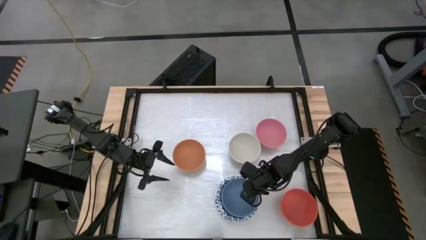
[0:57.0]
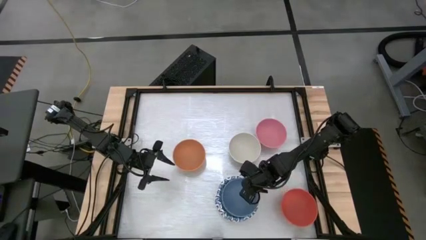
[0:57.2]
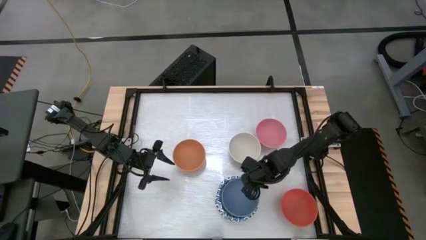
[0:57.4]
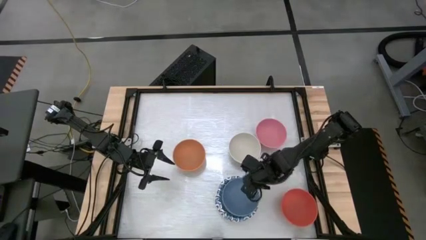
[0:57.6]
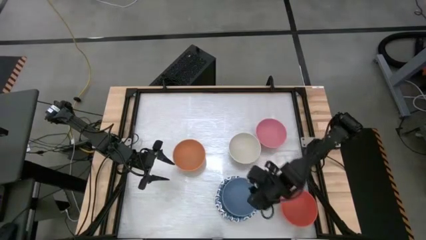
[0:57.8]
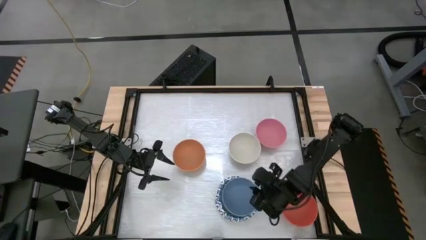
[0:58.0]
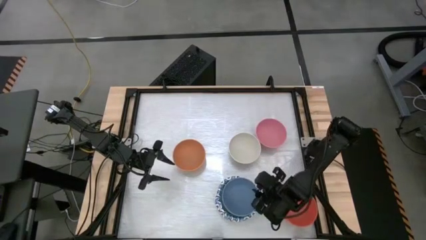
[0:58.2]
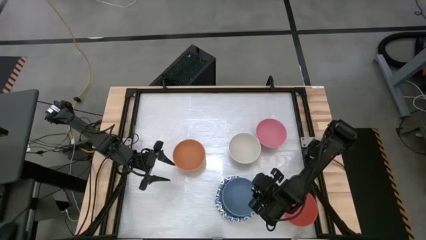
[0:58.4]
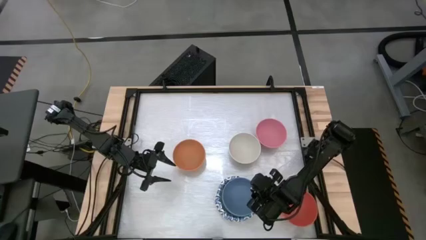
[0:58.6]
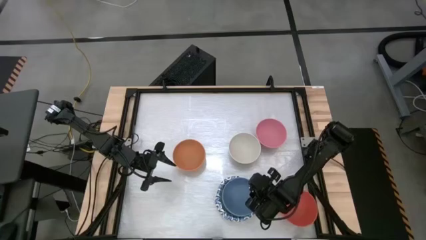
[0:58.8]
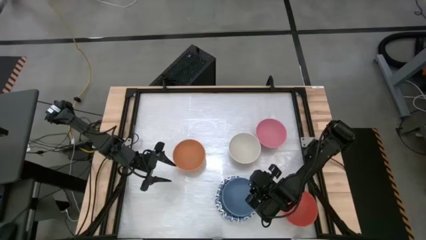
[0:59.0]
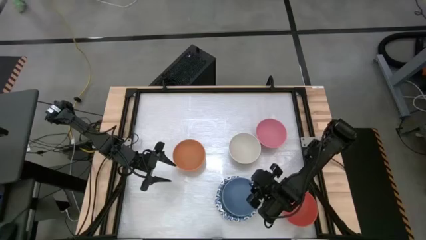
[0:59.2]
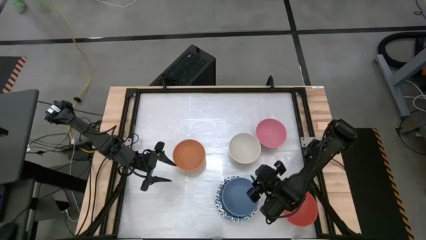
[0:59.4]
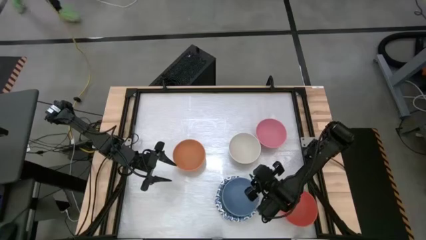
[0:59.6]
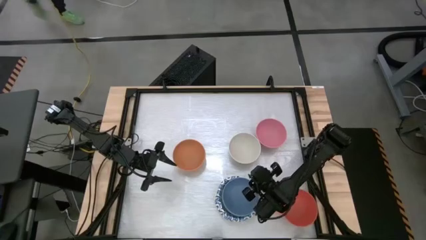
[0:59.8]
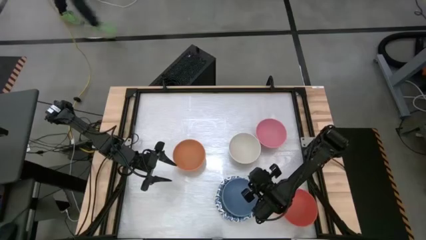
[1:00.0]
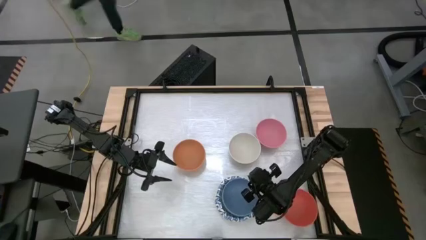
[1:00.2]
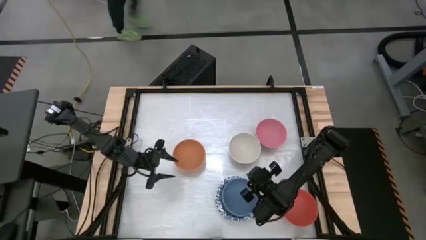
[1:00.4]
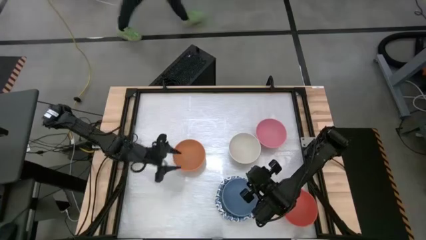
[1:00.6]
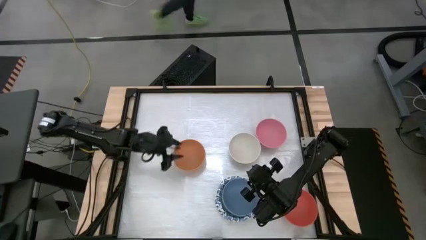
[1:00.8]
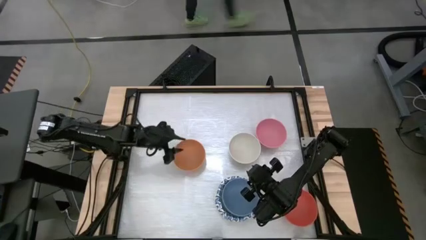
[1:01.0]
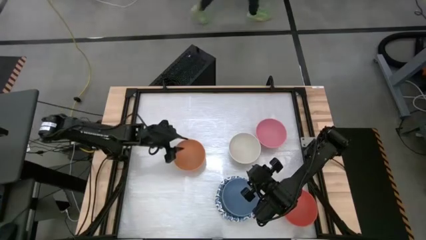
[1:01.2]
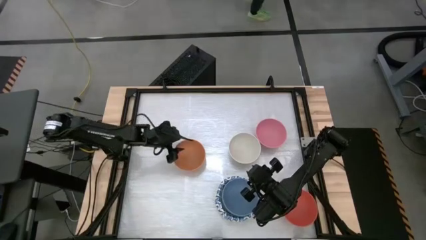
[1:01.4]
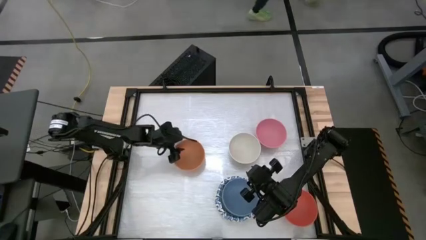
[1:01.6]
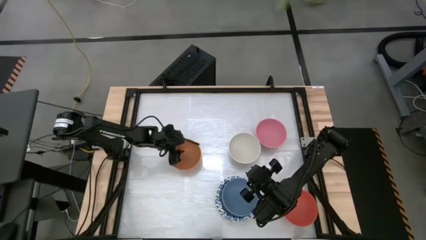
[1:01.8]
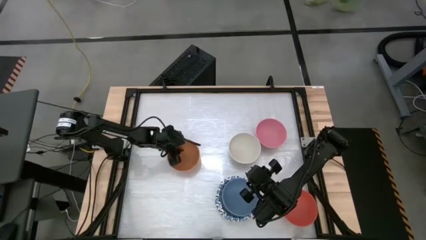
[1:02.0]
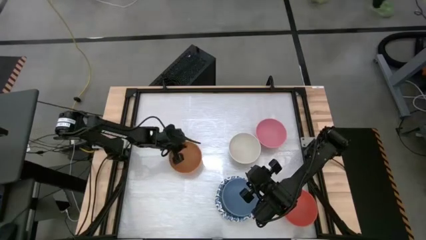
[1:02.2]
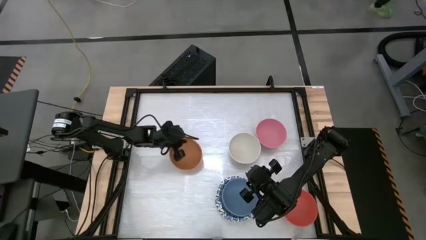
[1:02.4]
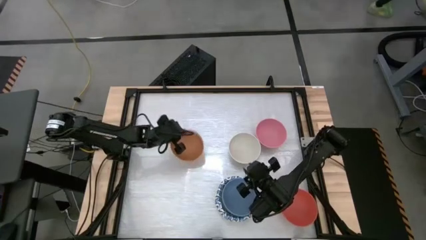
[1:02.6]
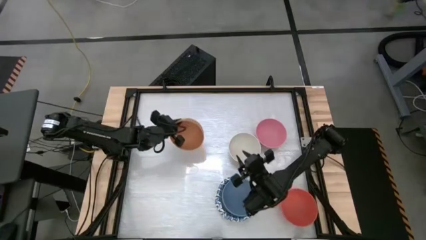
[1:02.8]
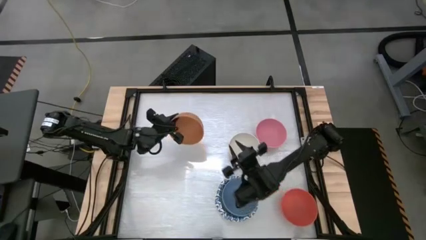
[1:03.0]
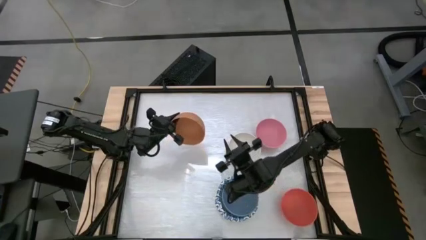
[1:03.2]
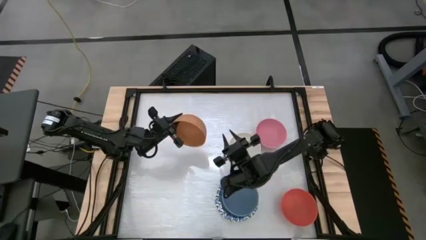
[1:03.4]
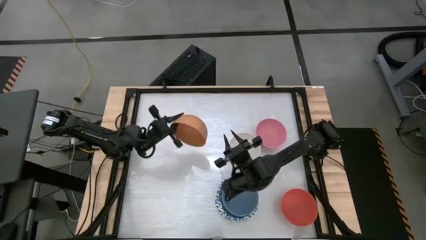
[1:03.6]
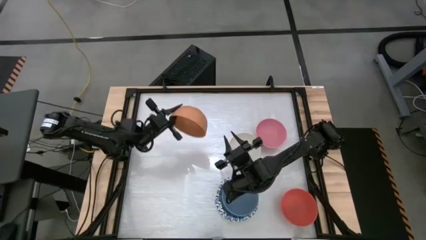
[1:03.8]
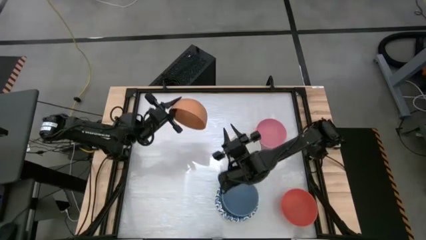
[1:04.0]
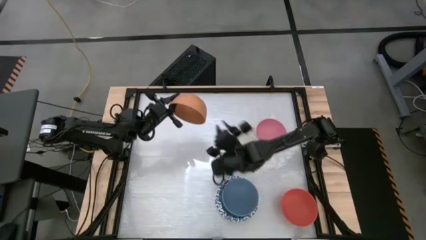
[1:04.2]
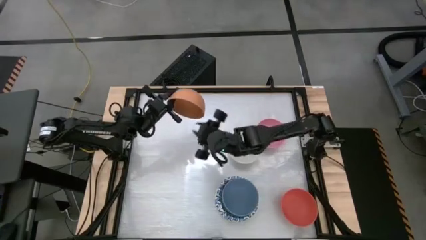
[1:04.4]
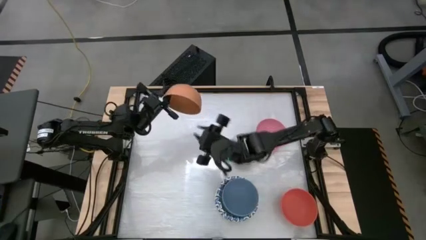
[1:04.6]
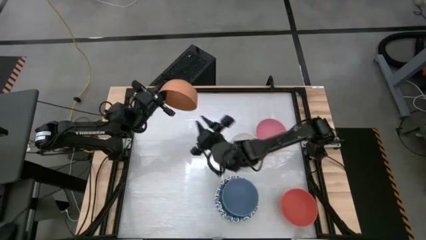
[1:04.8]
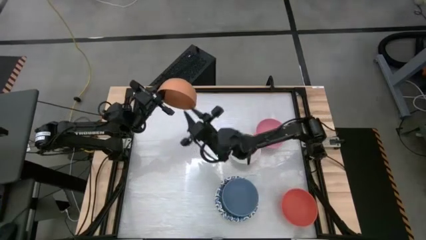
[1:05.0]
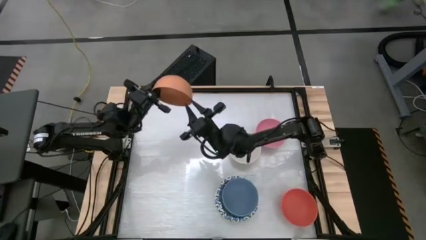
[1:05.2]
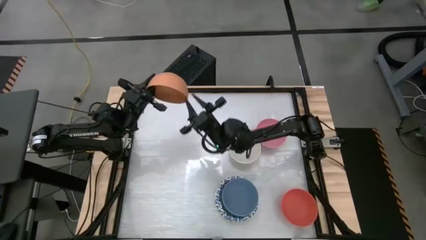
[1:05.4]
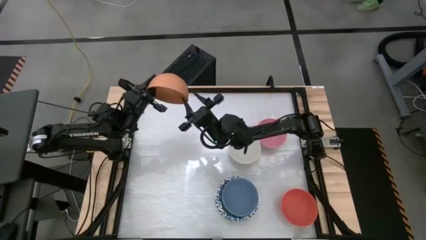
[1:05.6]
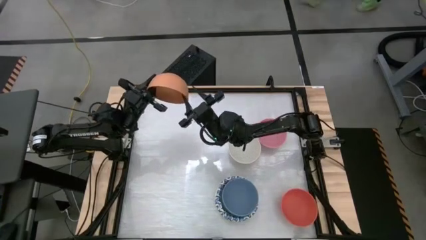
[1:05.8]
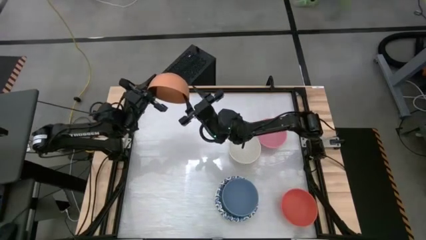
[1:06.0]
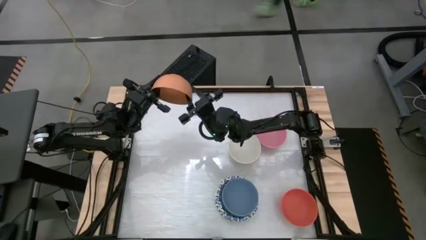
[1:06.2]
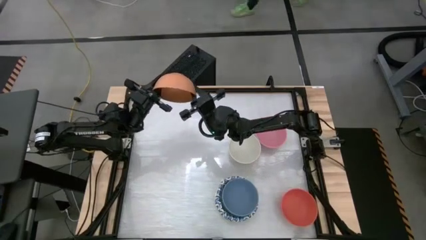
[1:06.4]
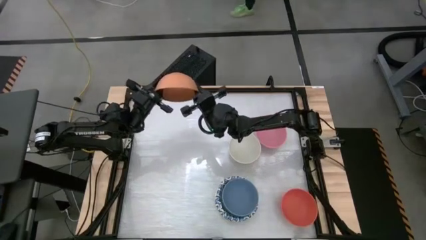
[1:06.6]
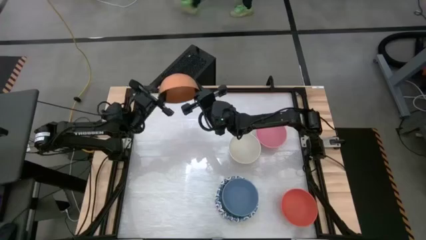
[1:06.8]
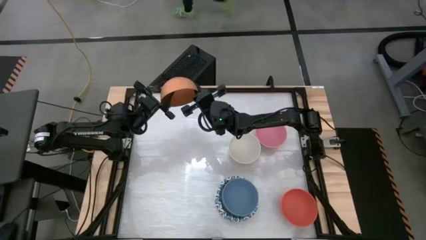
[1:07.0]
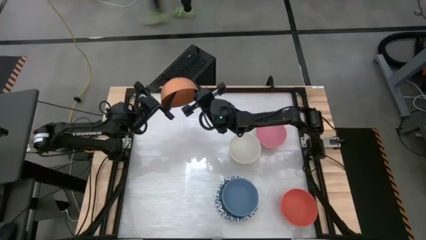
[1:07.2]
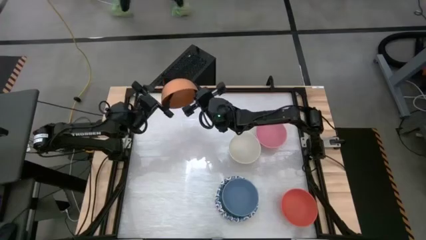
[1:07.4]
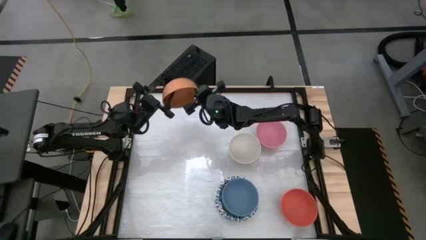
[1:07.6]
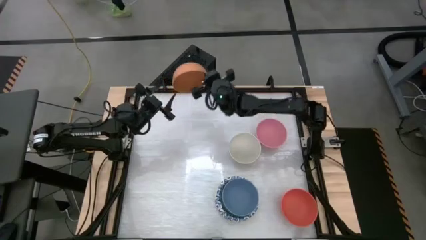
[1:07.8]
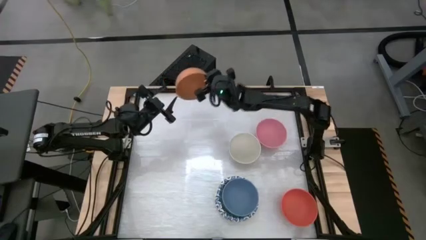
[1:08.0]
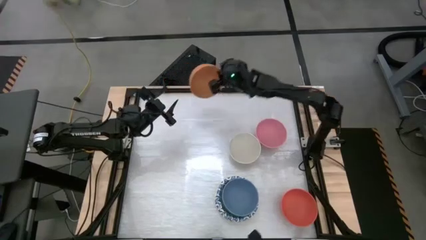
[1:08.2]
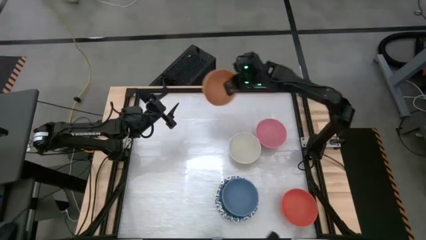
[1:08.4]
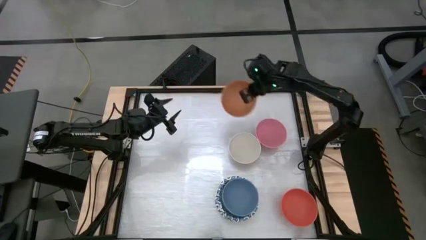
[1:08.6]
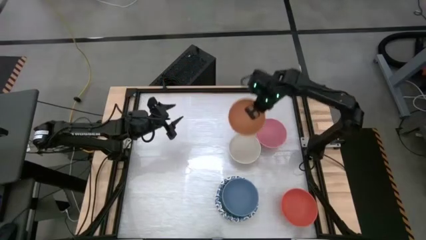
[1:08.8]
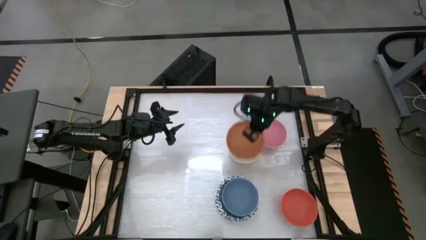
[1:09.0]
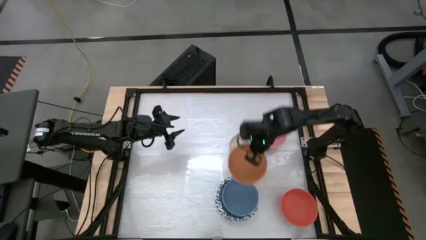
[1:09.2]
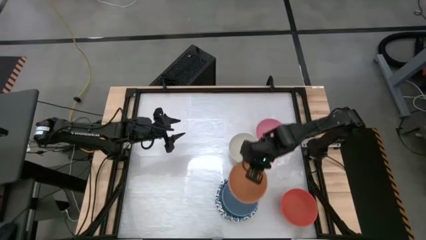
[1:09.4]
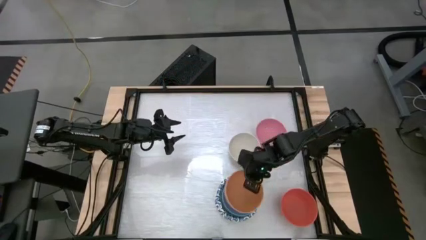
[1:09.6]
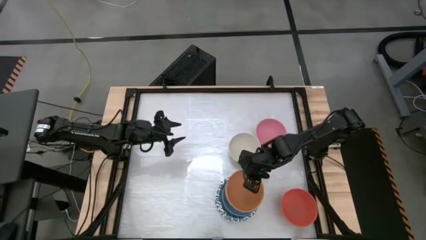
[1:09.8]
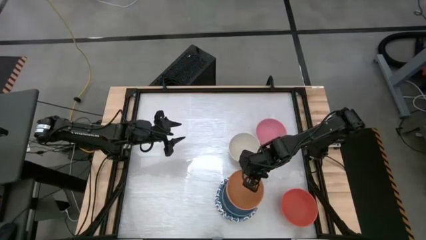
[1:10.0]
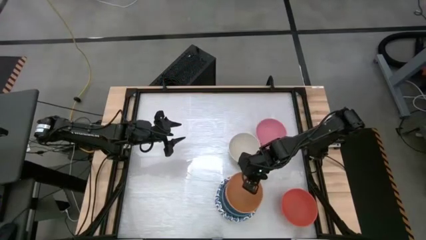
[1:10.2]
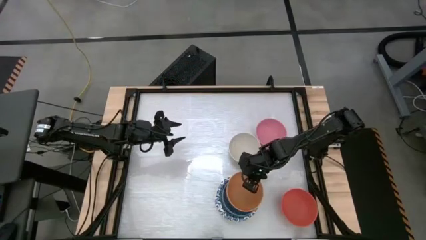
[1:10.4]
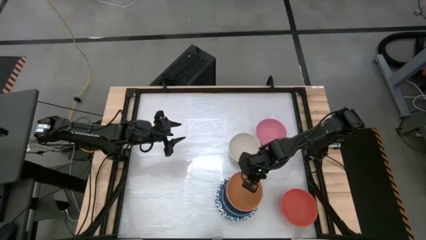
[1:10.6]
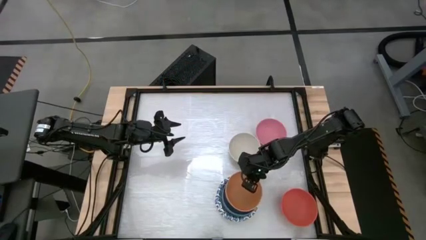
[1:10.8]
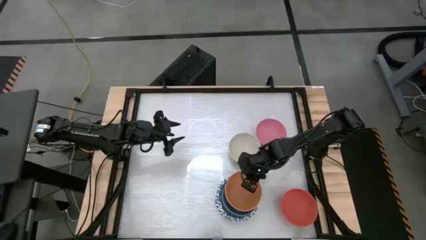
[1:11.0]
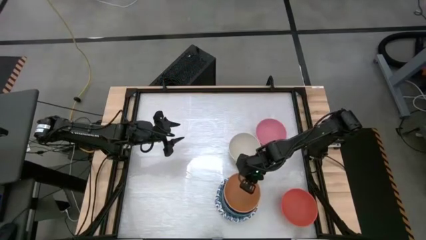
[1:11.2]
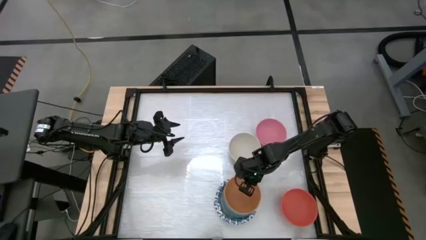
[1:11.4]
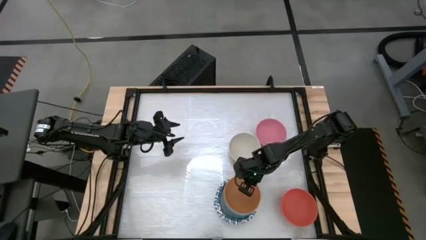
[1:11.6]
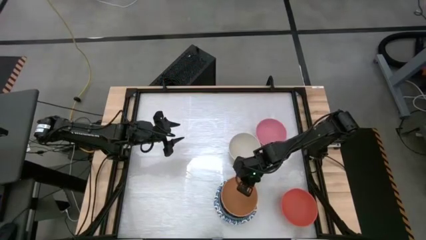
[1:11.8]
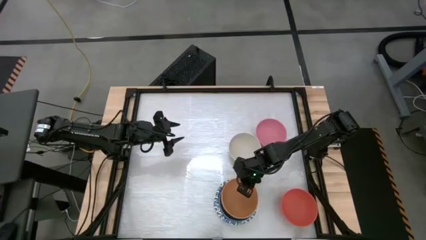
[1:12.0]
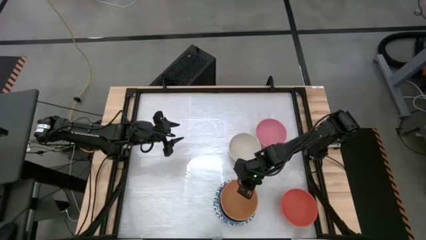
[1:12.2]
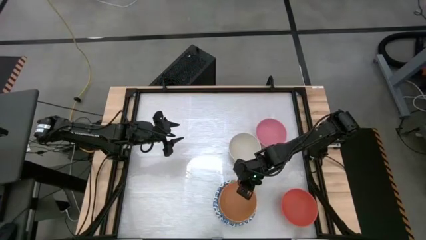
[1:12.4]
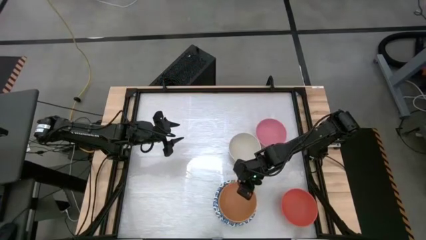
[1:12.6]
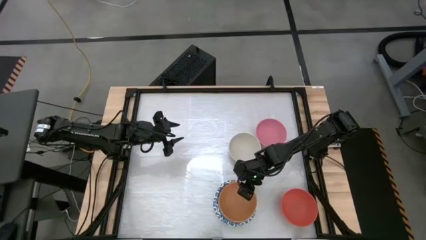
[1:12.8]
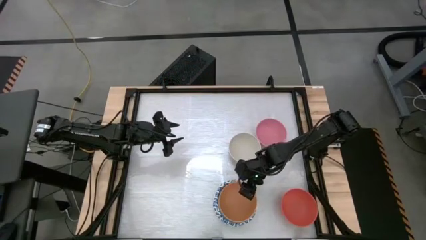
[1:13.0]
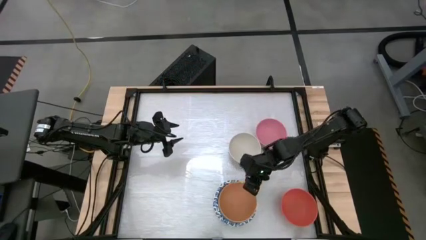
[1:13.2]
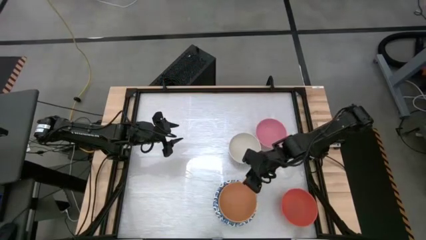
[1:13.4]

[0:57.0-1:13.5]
Stack the brown bowl into the blue bowl
